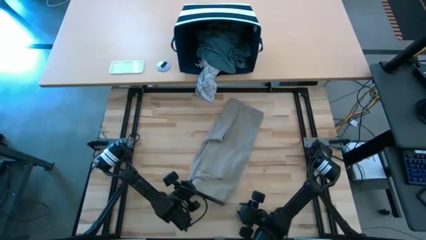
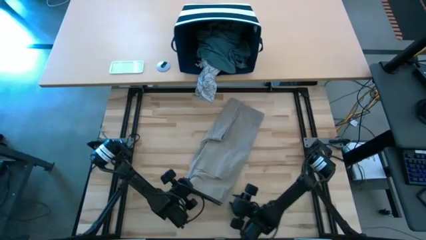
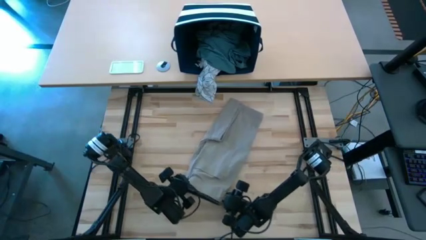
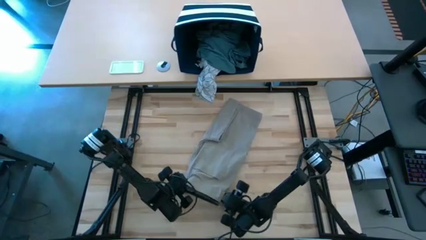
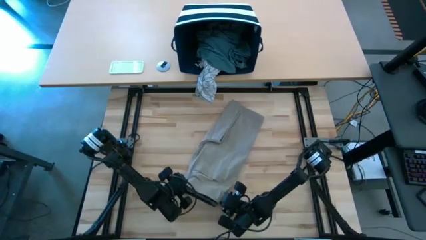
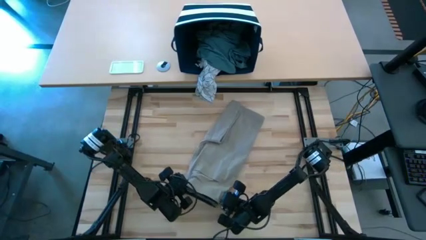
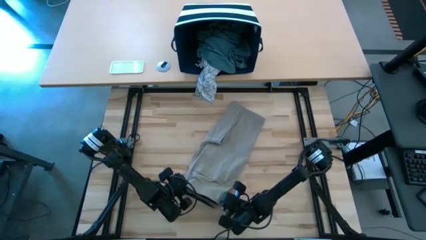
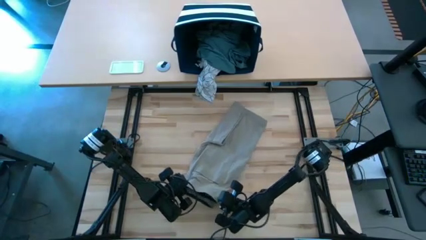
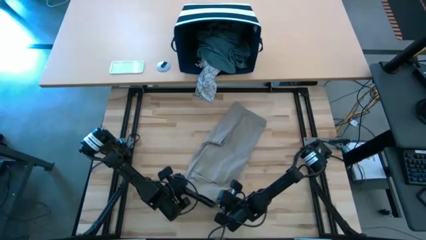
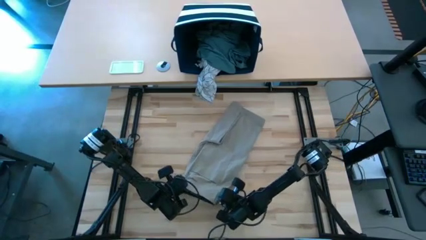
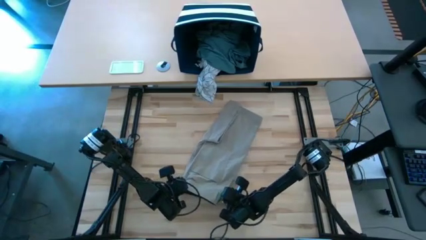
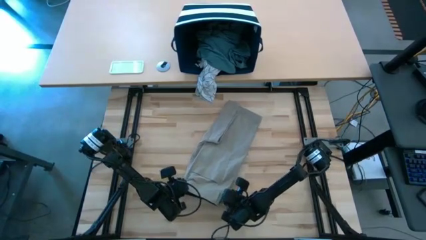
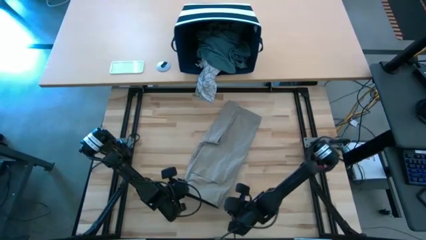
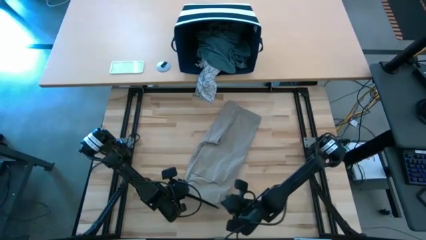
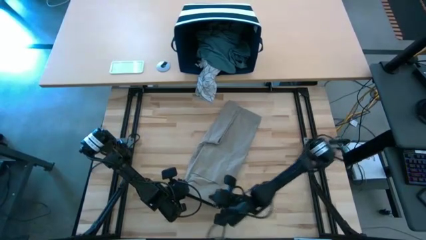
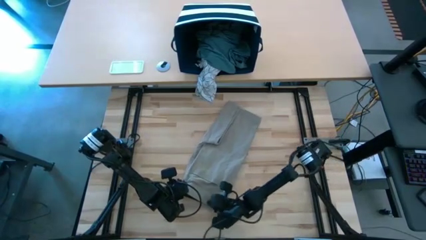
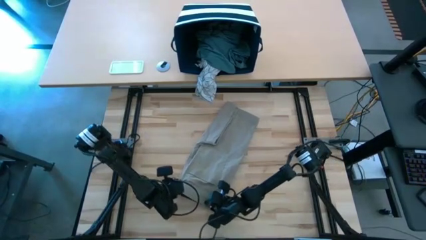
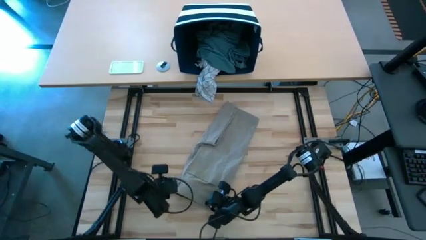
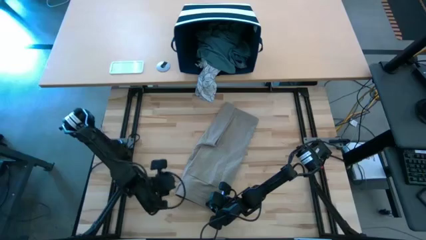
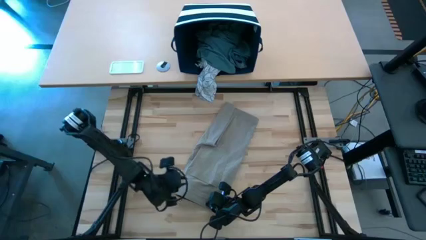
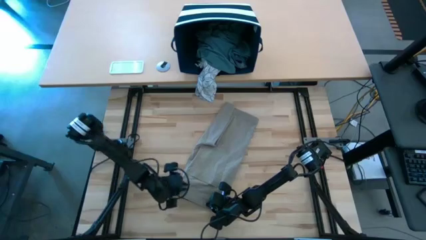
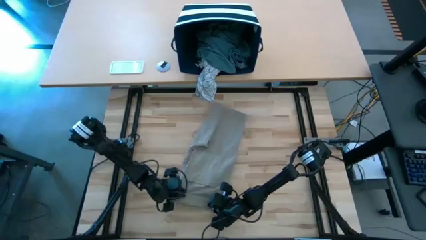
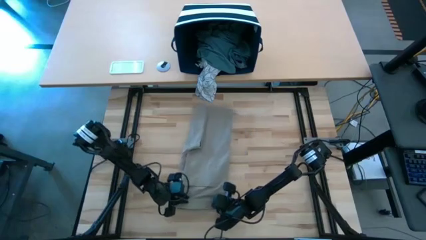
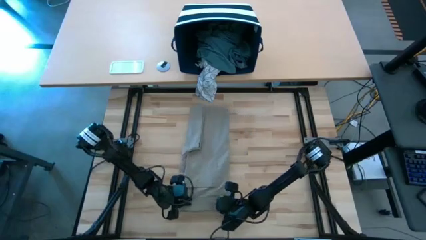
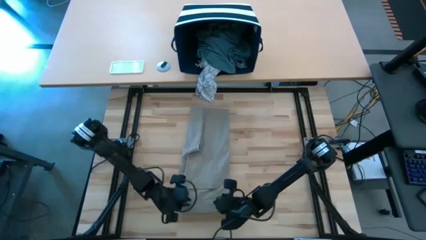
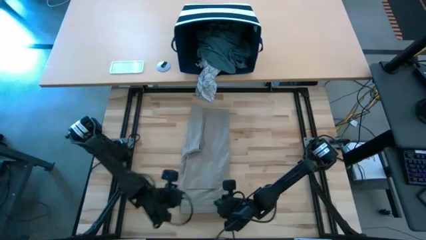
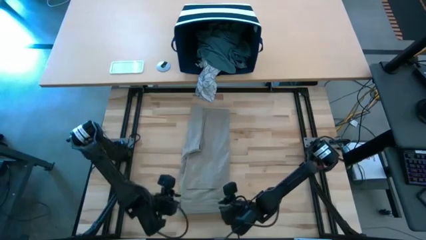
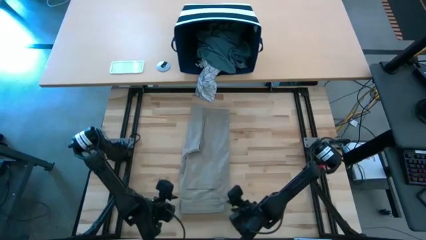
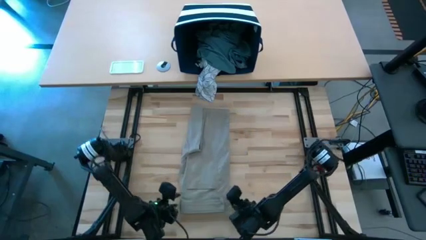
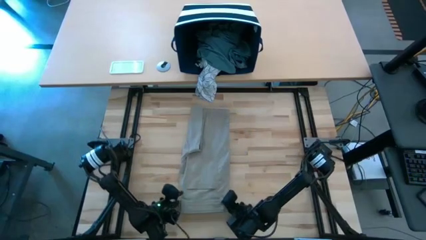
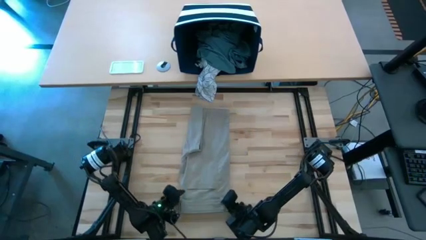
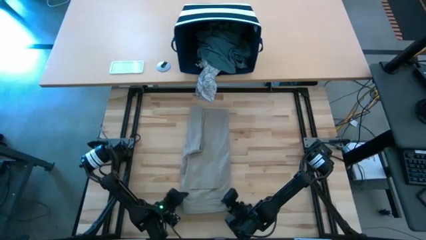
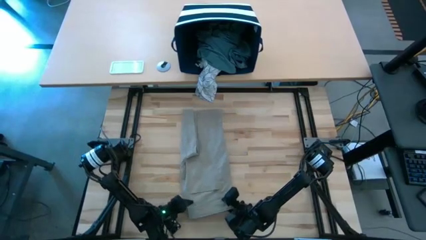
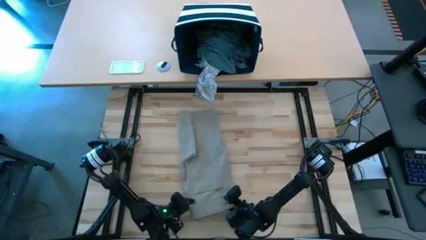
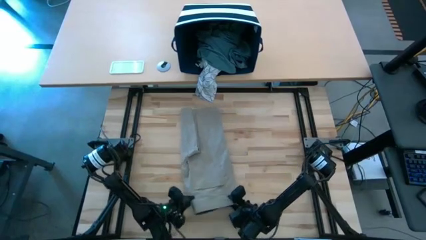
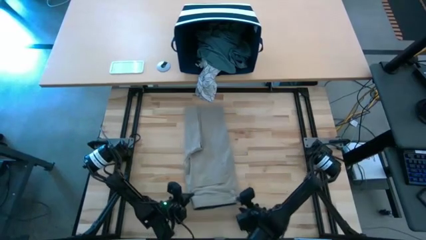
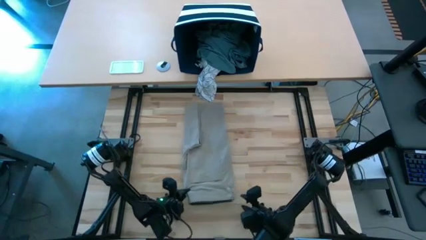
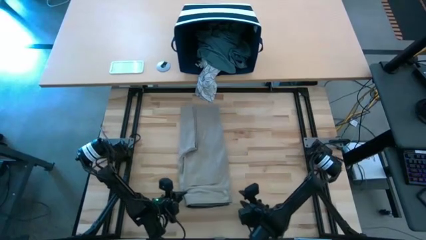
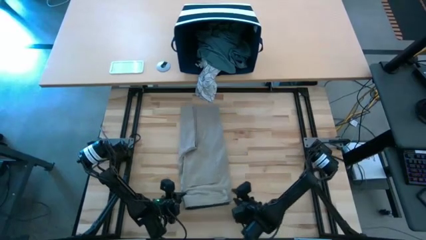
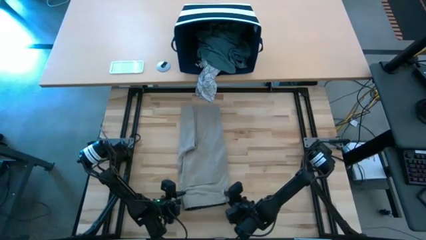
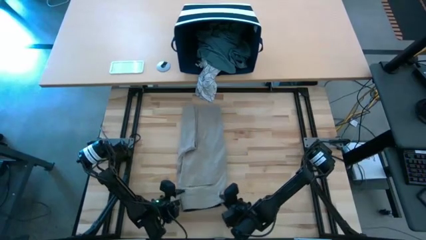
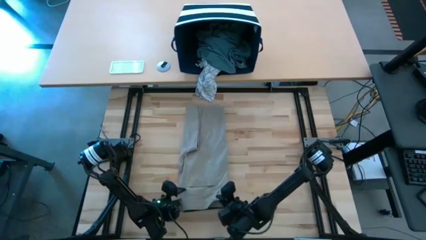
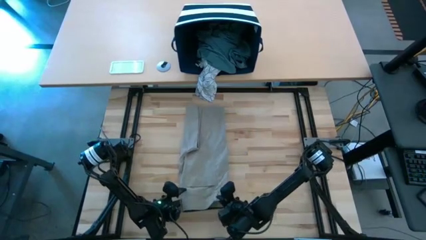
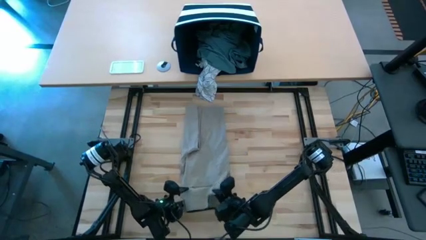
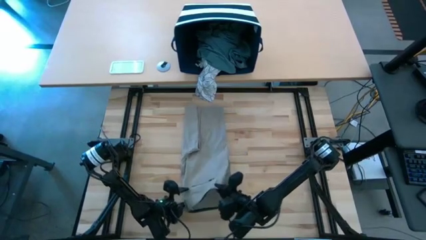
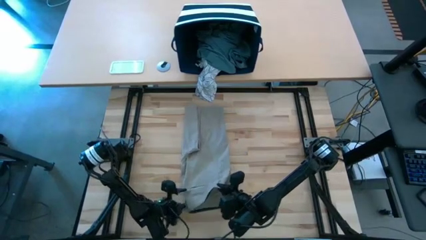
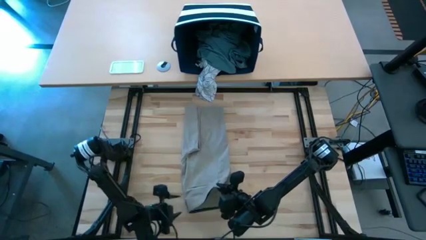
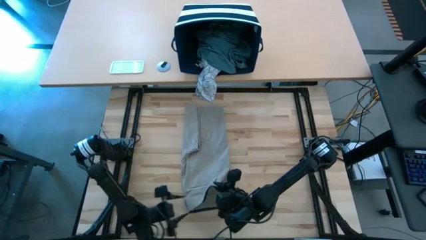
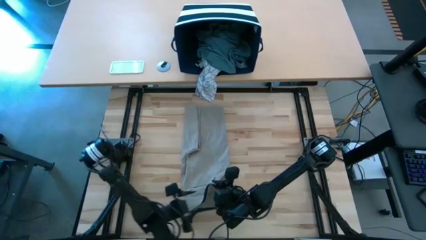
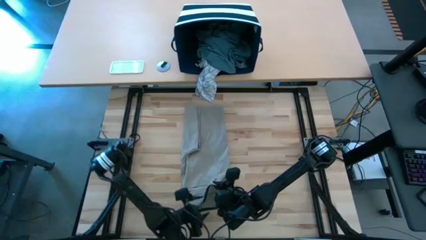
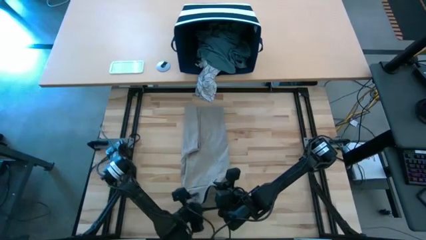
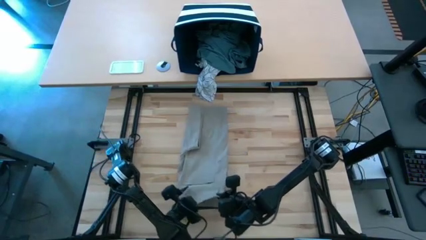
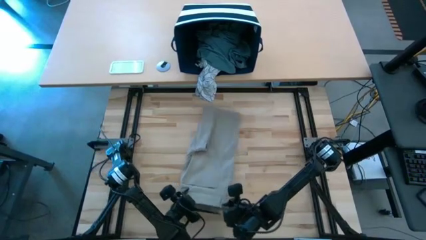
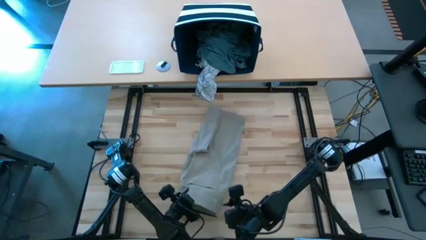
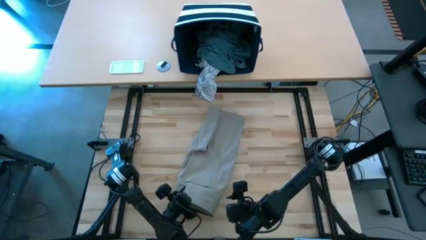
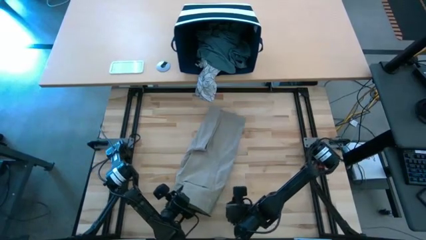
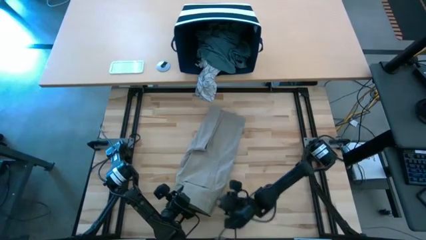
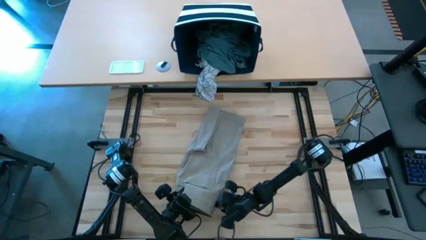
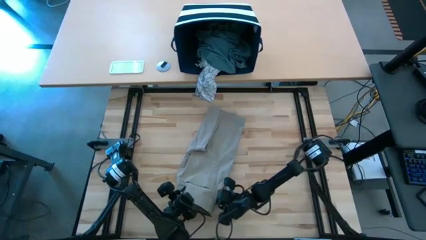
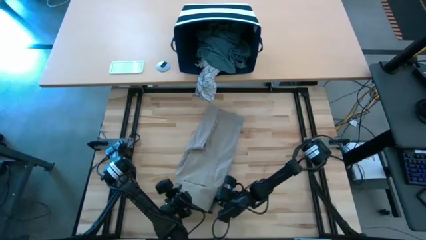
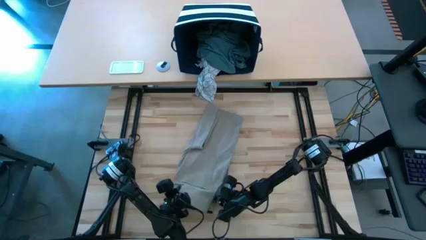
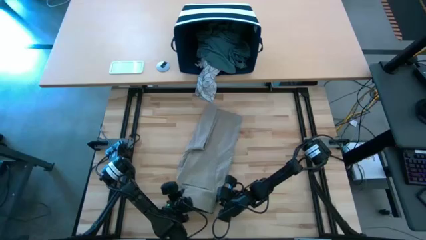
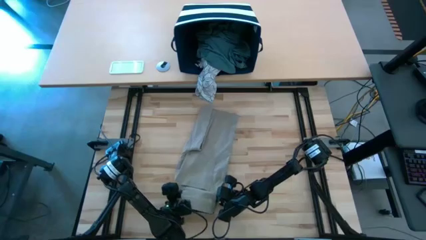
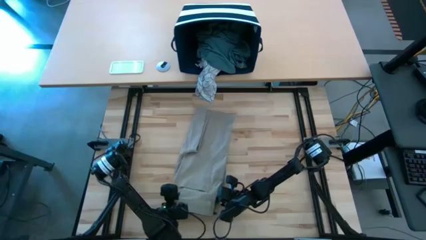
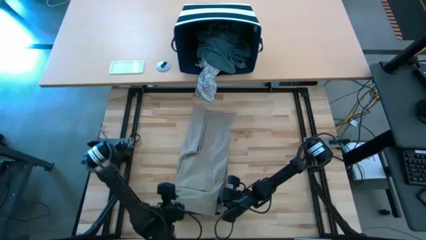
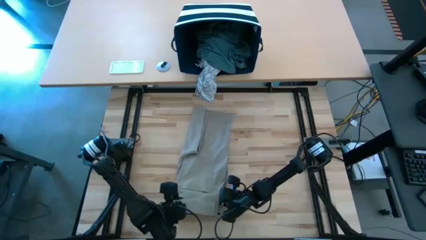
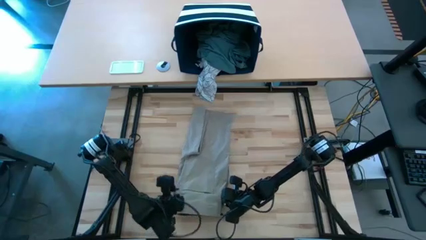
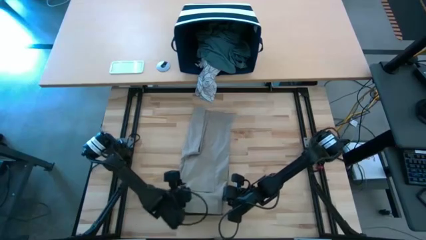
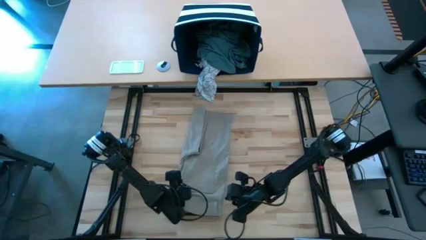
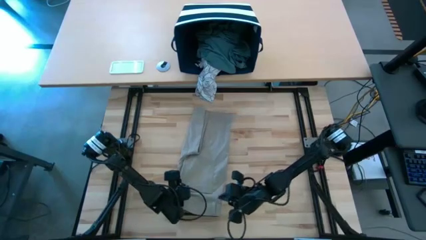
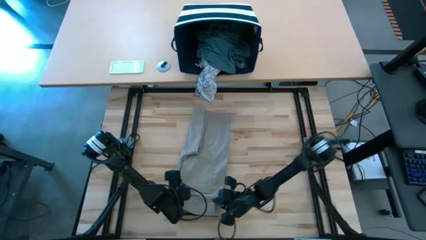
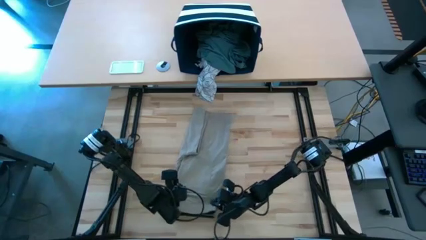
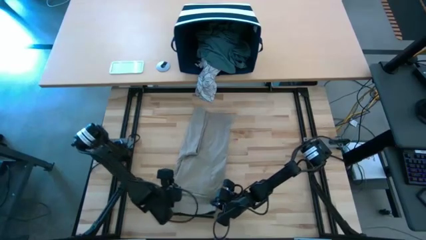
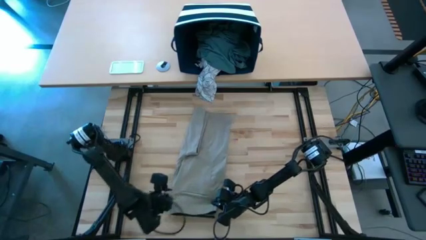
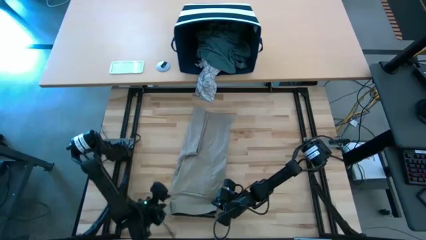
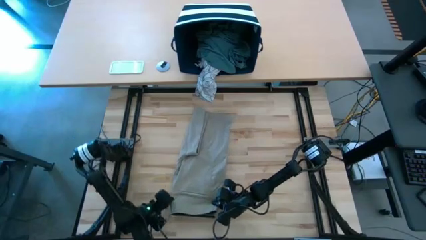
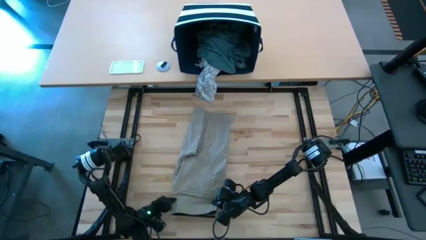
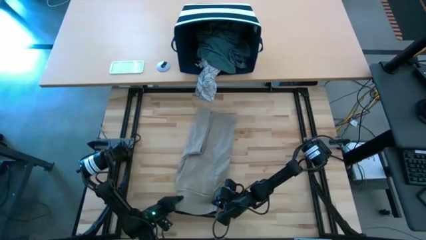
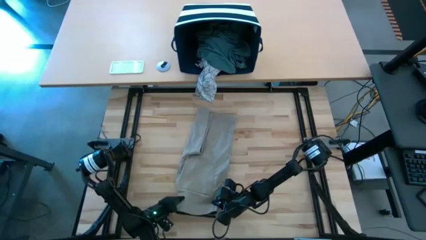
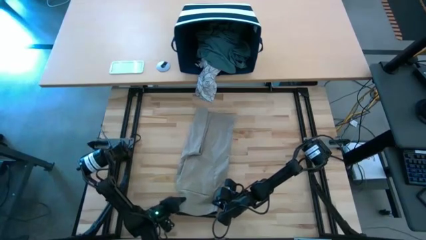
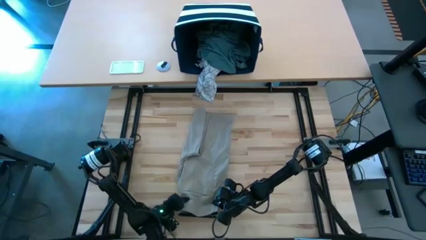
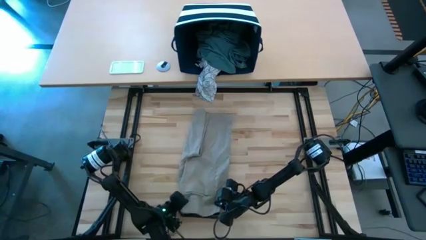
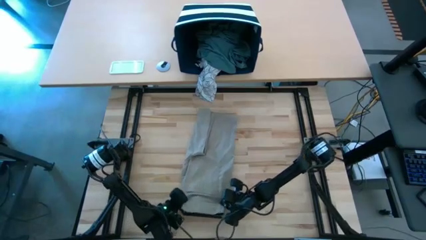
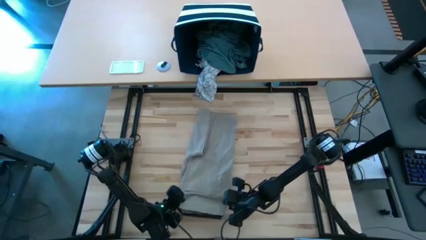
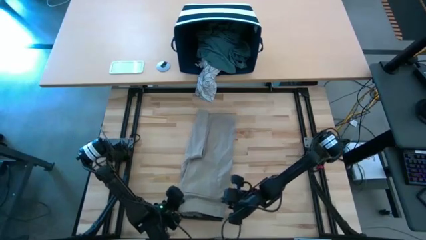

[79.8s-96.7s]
Task: Fold Laundry from Bin
Fold the brown shorts from the blue laundry basket
